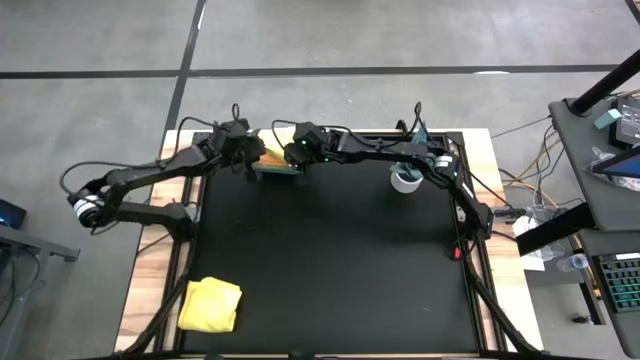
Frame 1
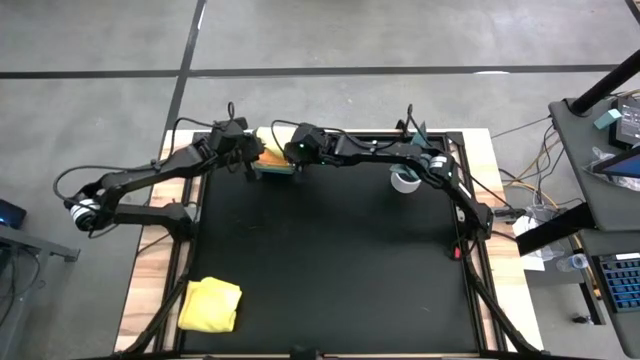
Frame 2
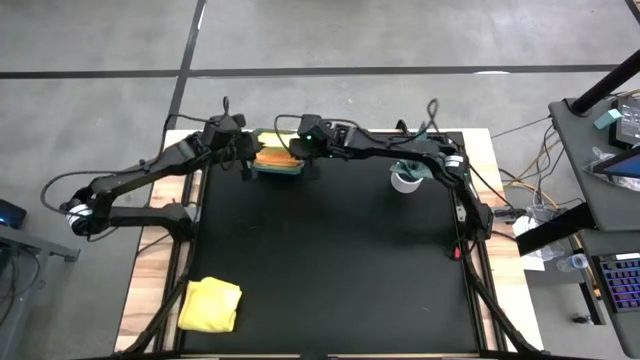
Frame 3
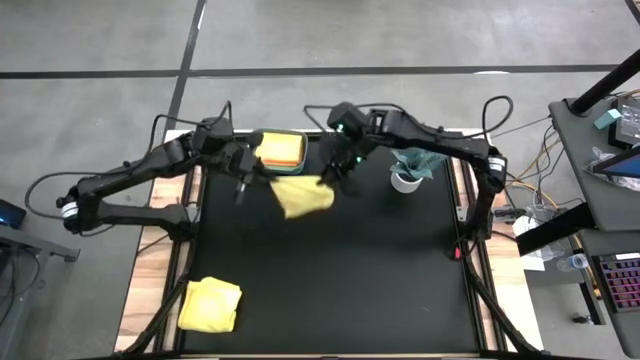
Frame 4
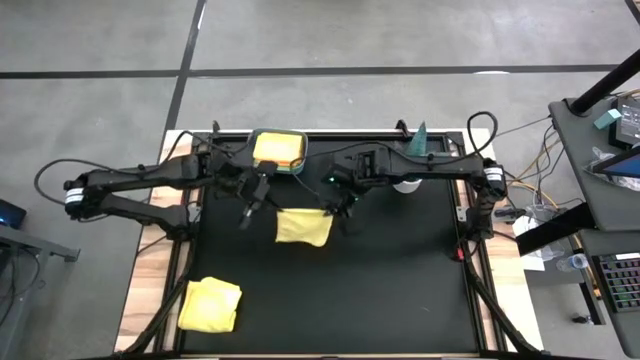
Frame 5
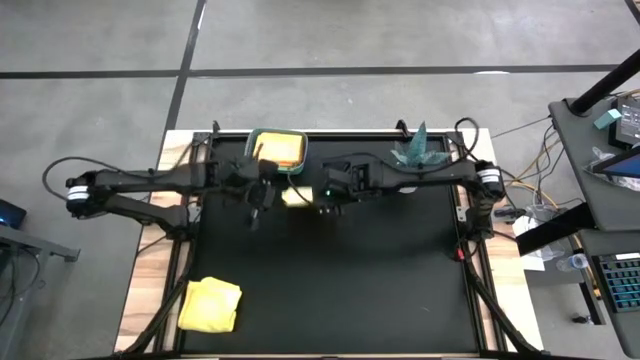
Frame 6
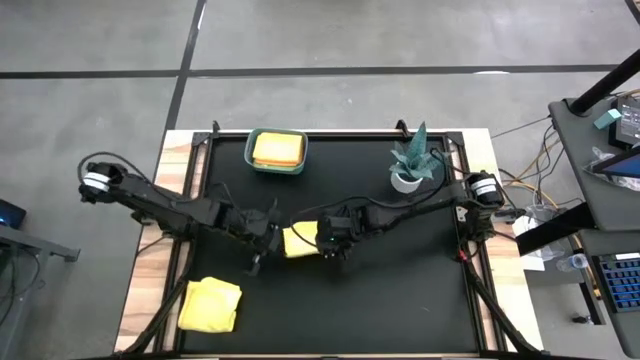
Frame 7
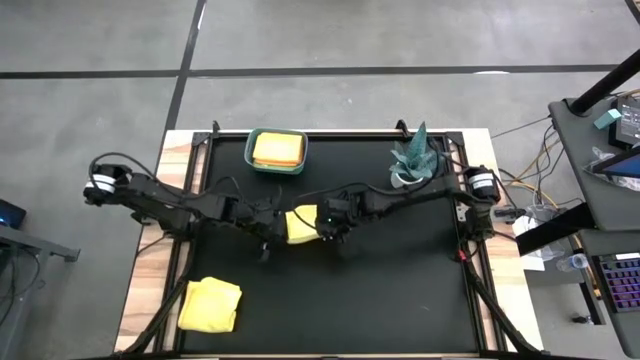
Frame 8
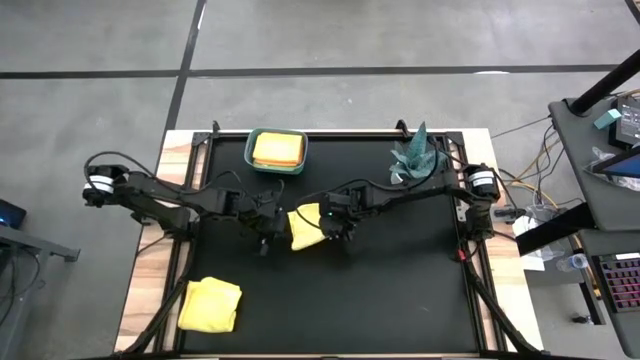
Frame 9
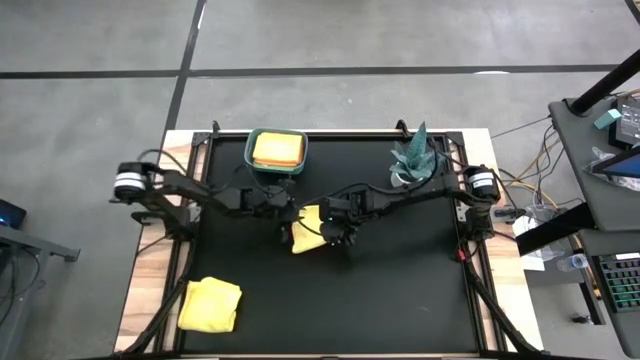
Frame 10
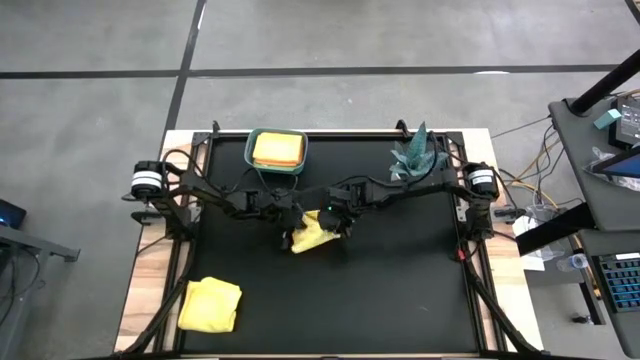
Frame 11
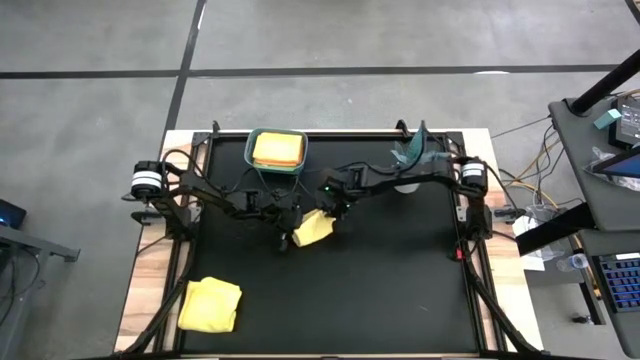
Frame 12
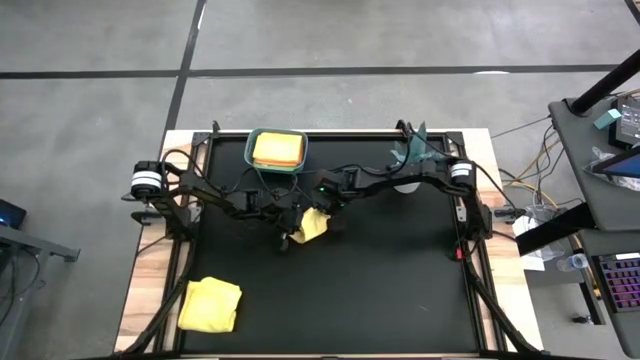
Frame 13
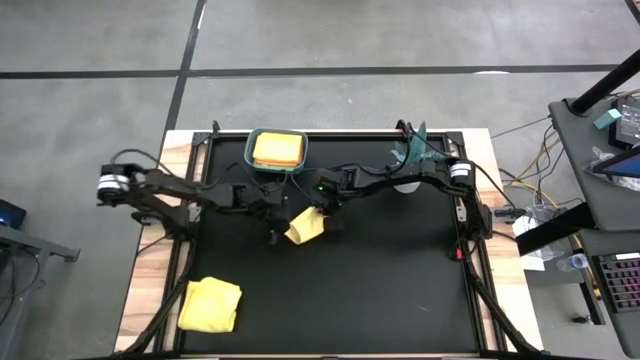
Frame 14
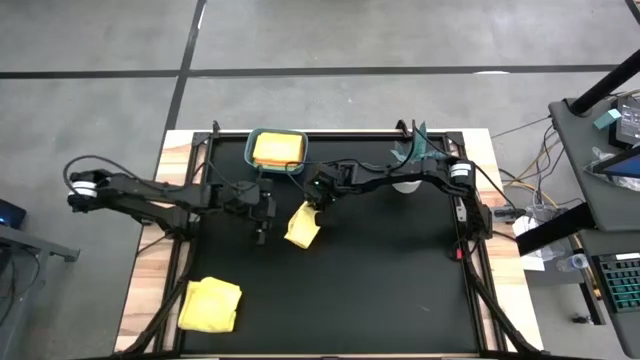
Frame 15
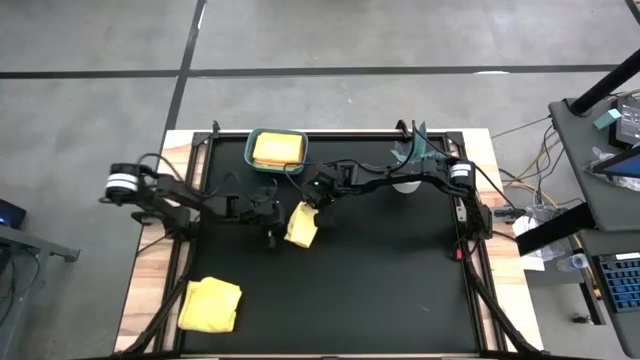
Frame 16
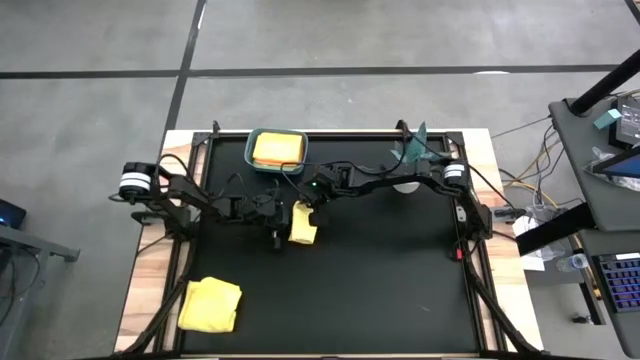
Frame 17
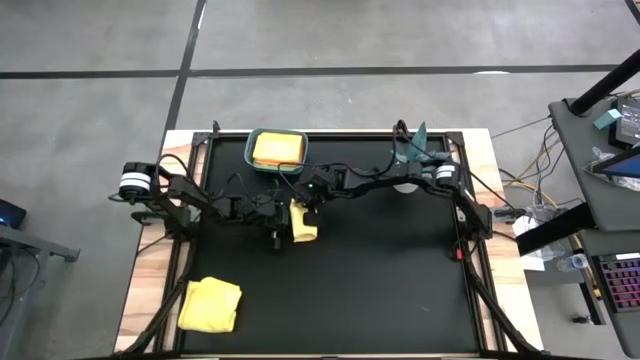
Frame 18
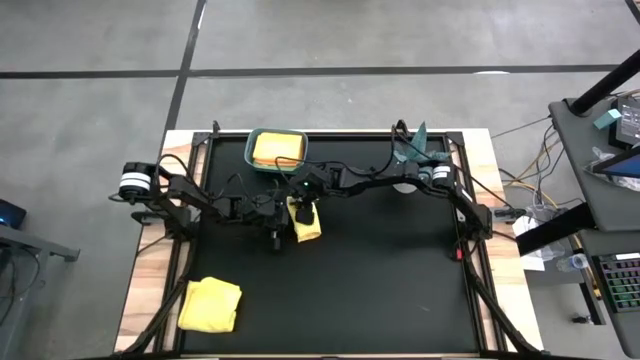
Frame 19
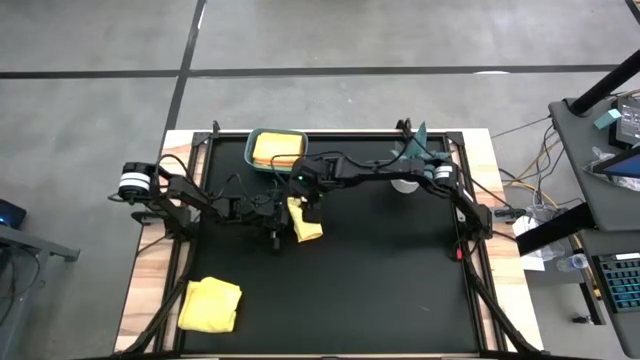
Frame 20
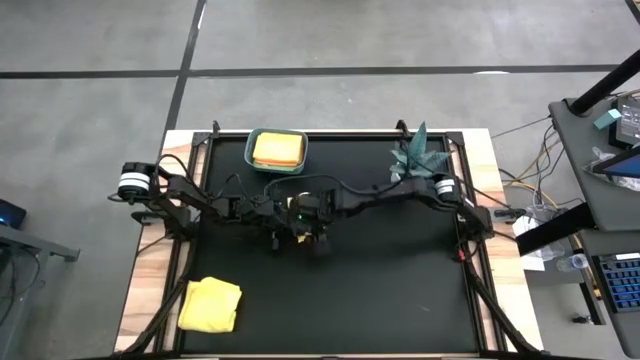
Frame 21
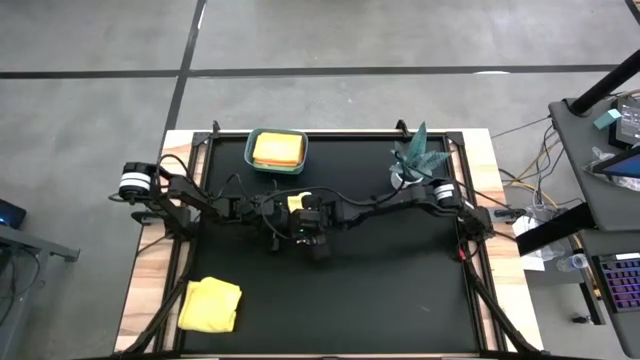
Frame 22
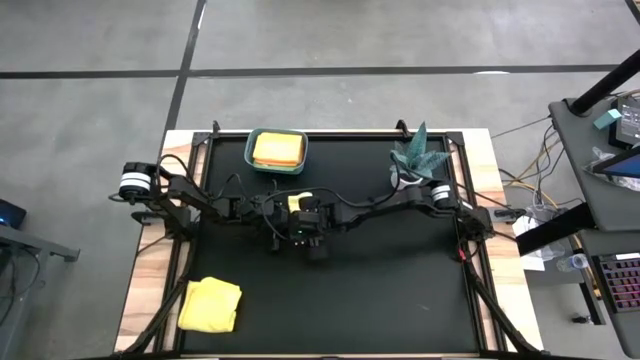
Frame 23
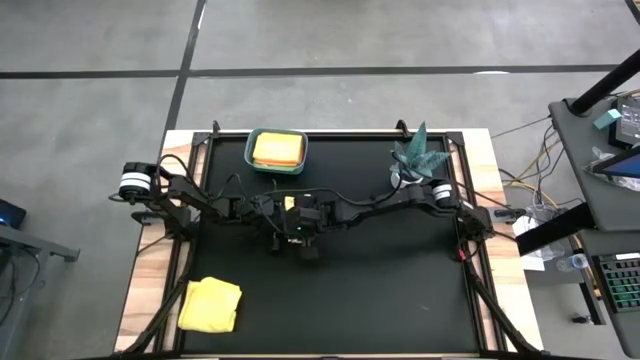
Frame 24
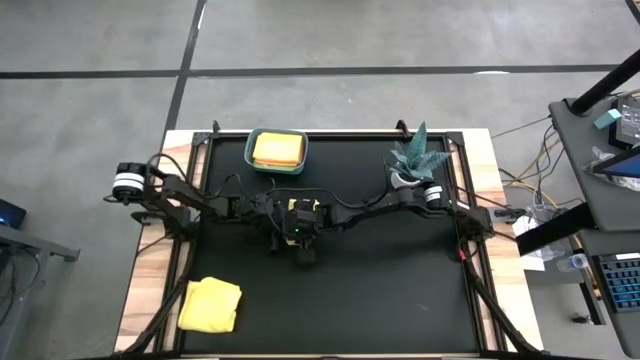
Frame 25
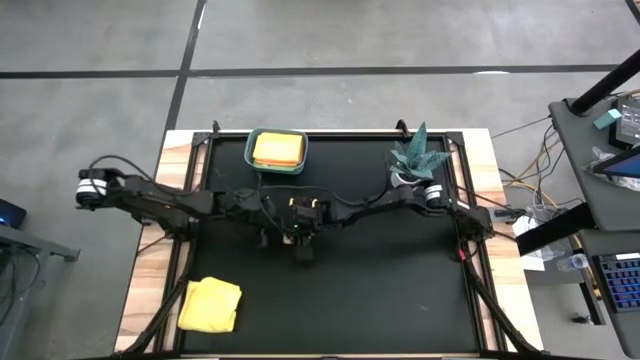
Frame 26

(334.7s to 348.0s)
Task: Fold microfiber towels
Fold the right yellow microfiber cloth

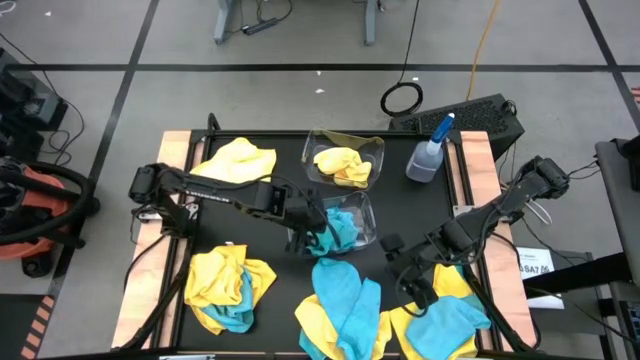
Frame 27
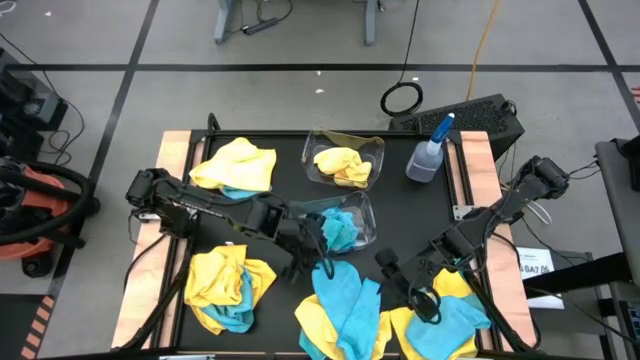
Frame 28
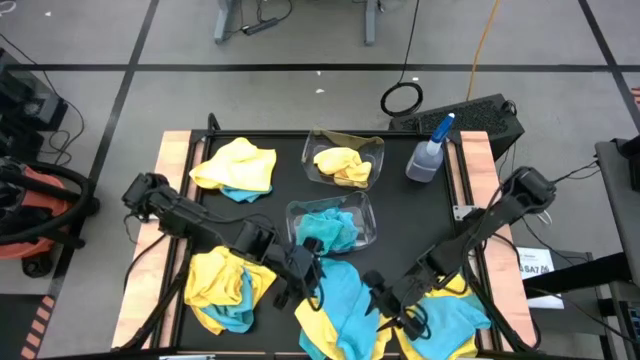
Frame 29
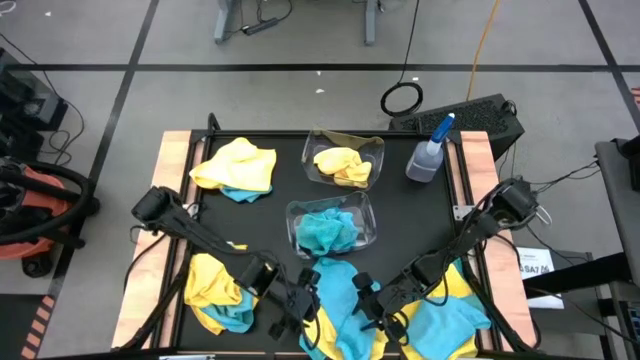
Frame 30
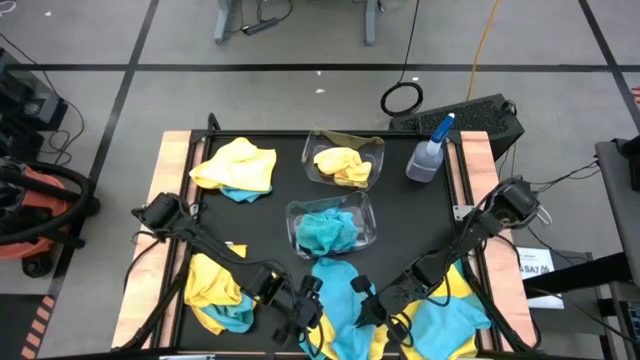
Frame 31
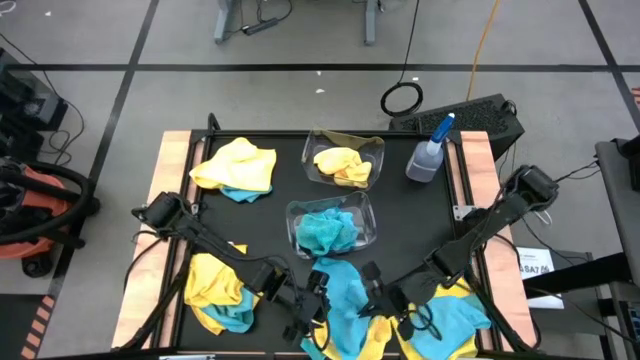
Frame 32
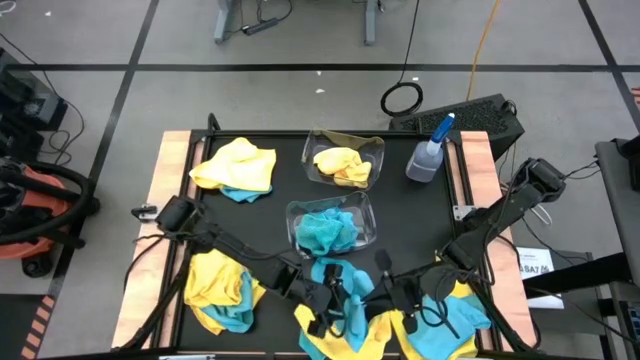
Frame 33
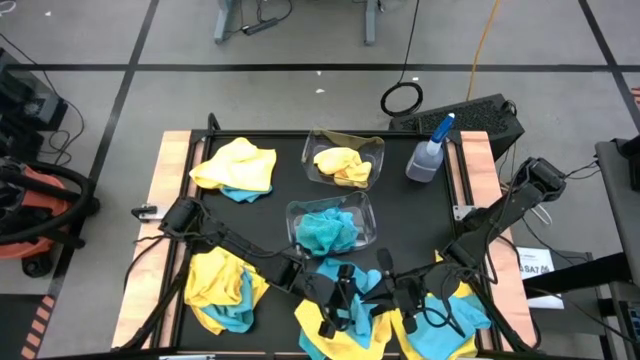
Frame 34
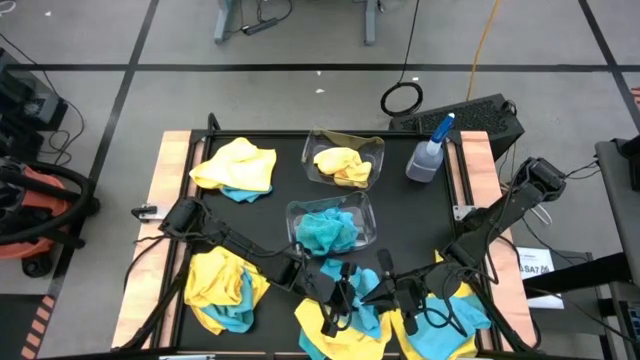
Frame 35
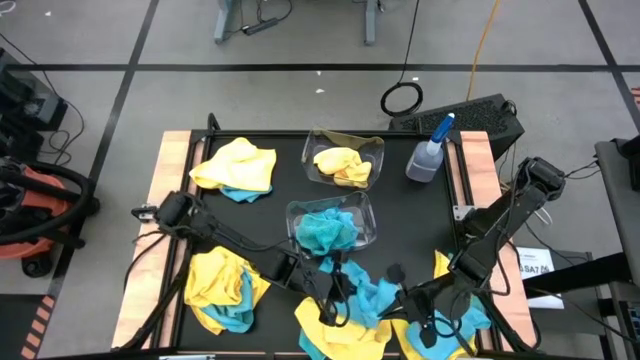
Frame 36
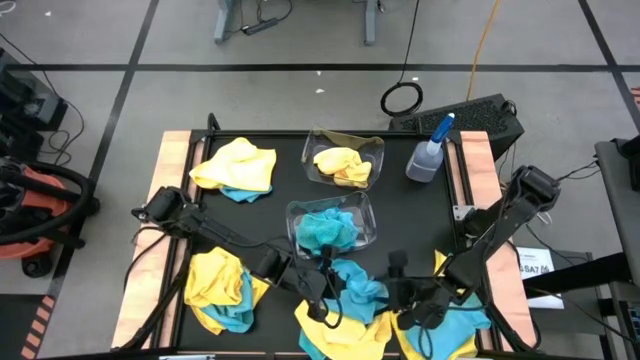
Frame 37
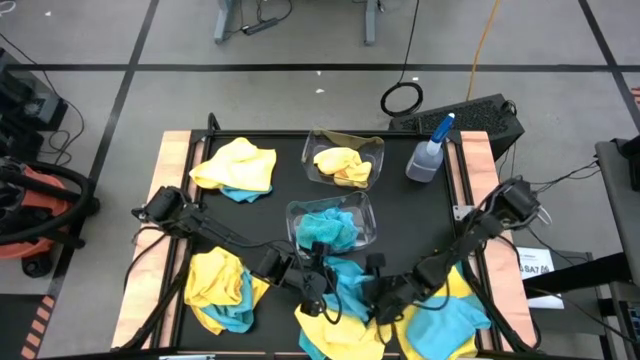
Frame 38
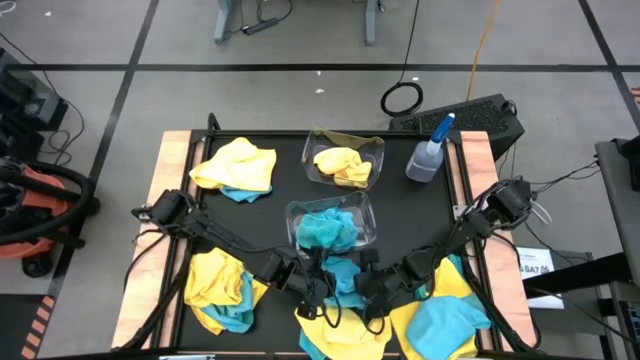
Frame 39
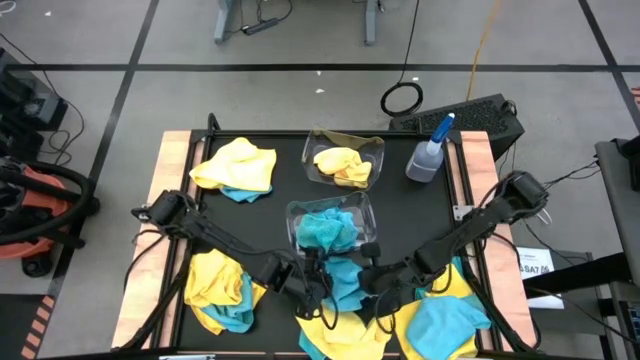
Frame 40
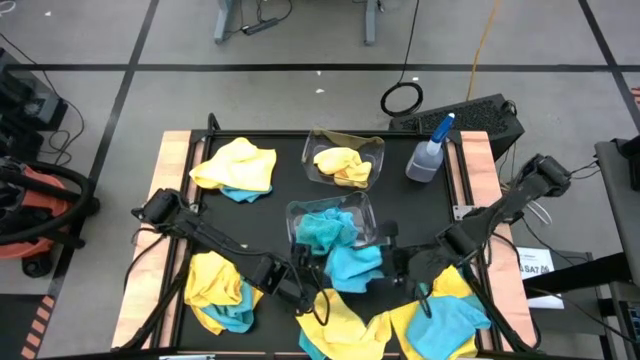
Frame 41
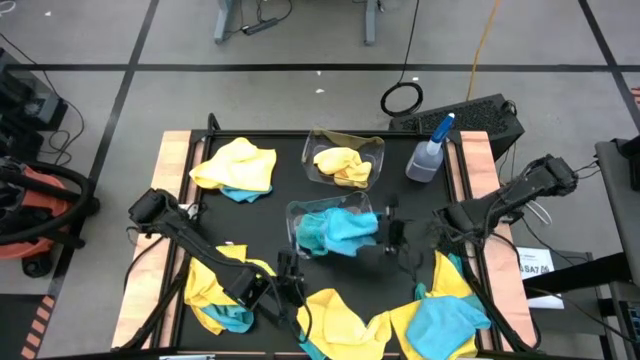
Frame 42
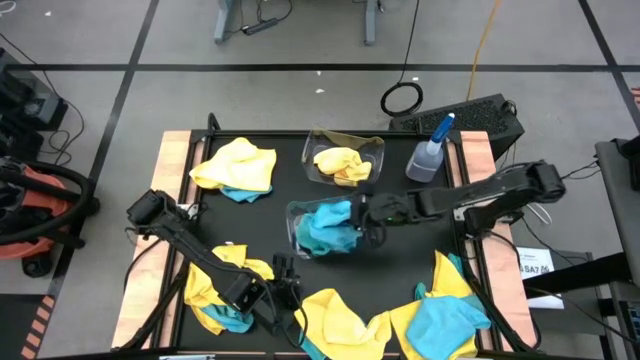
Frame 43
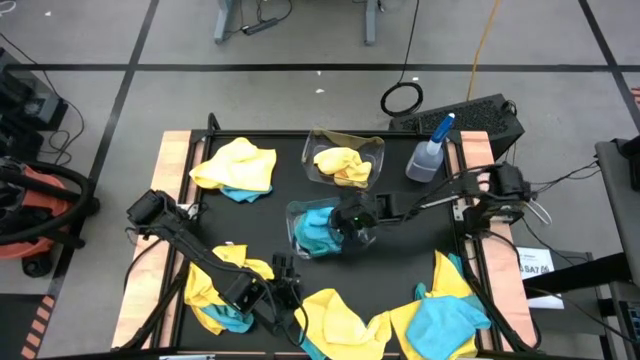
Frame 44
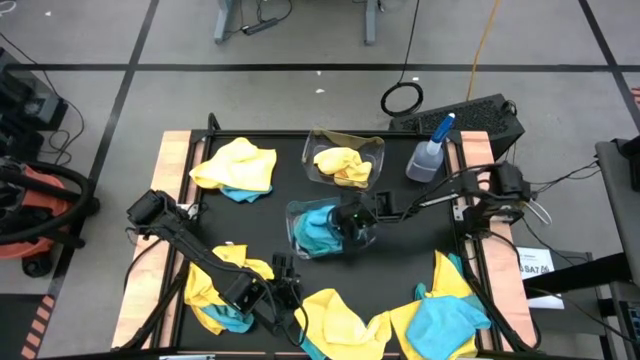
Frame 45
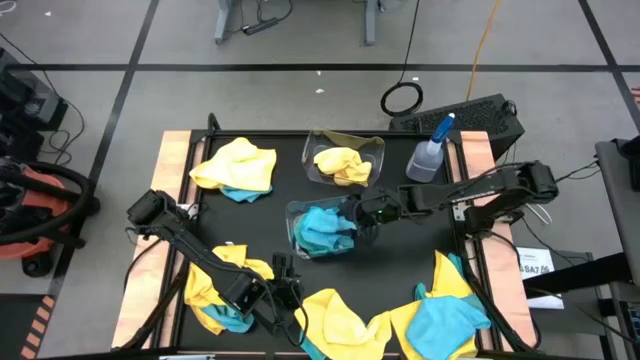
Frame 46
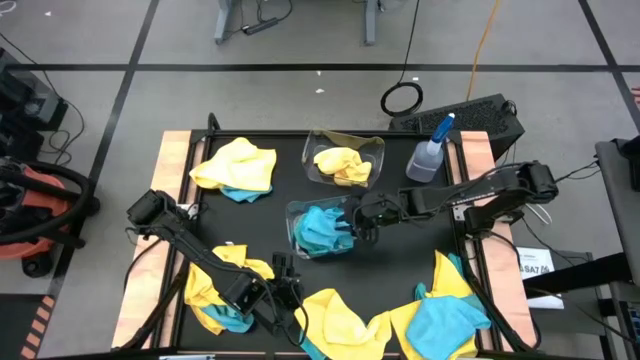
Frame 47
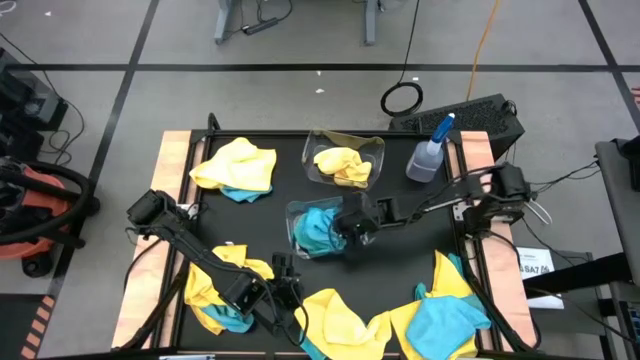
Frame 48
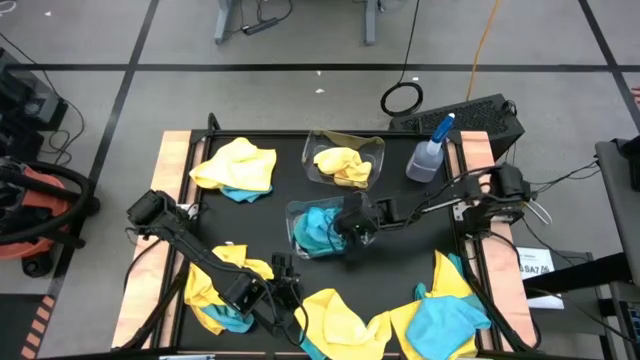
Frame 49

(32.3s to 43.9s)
Task: Sort microfiber towel by color & place in baskets
Put the blue microfiber cloth into the bottom transparent bin
